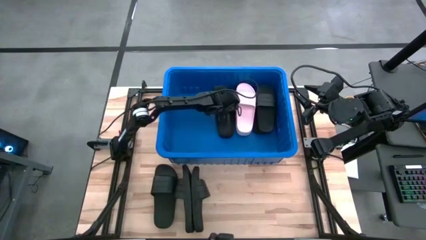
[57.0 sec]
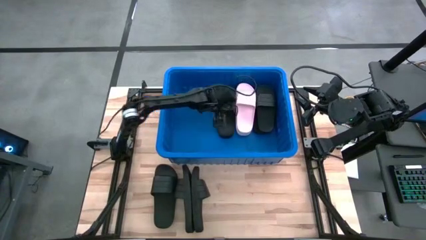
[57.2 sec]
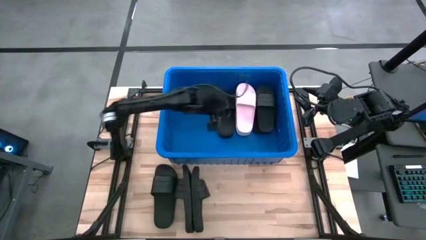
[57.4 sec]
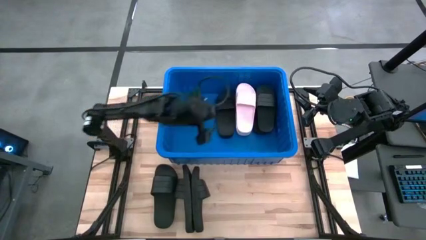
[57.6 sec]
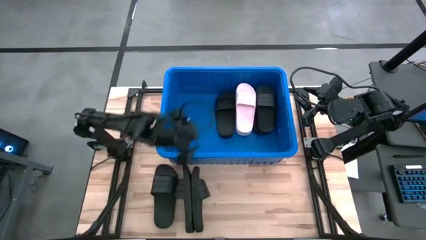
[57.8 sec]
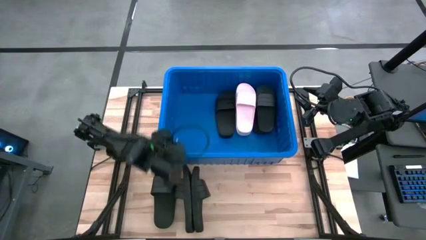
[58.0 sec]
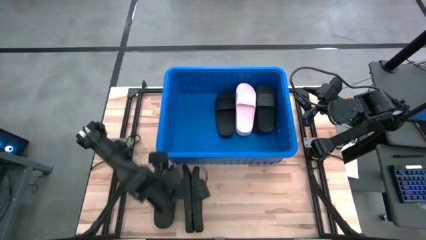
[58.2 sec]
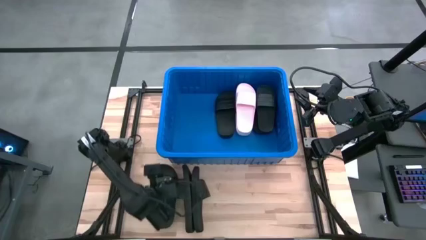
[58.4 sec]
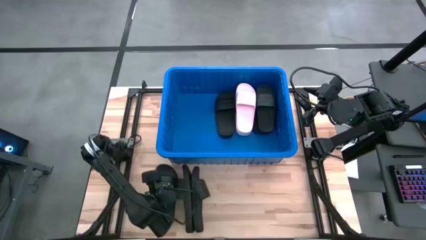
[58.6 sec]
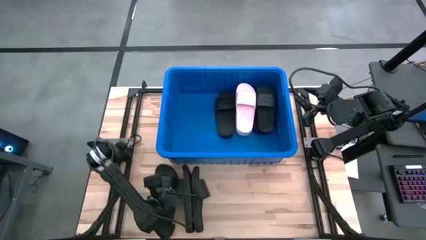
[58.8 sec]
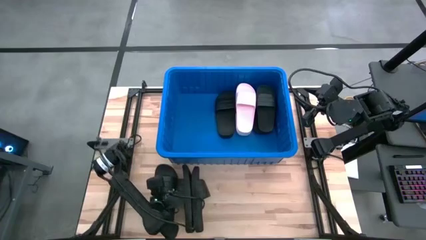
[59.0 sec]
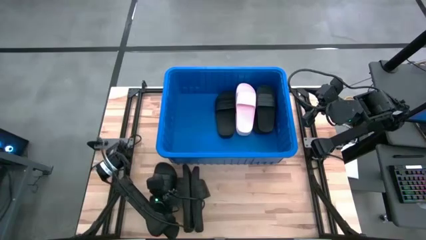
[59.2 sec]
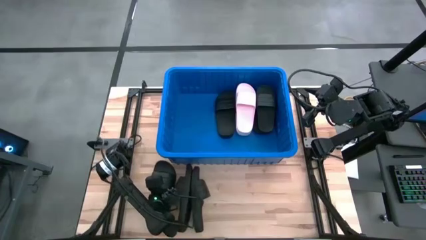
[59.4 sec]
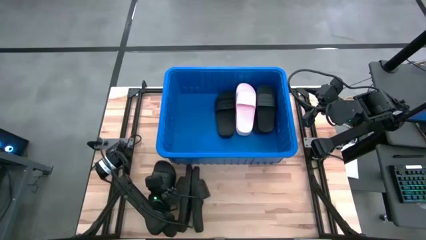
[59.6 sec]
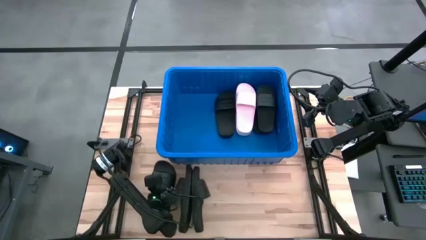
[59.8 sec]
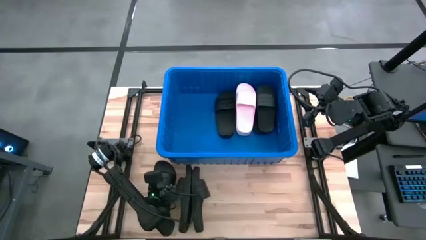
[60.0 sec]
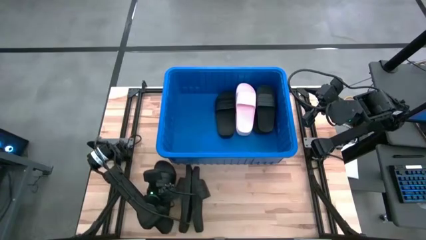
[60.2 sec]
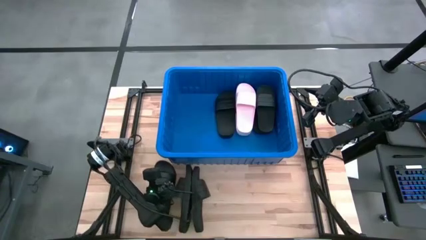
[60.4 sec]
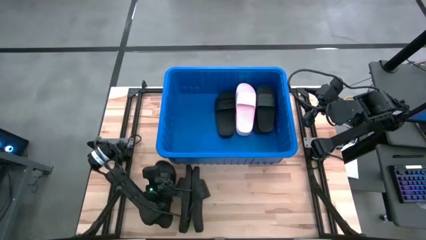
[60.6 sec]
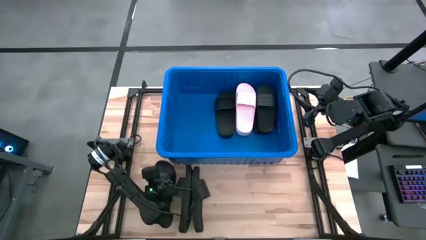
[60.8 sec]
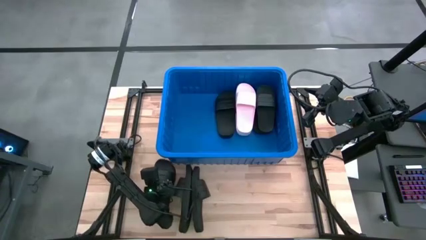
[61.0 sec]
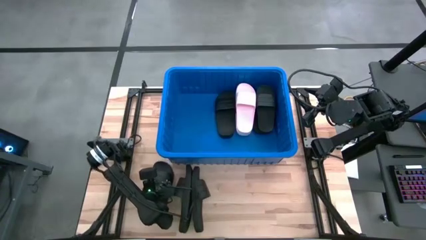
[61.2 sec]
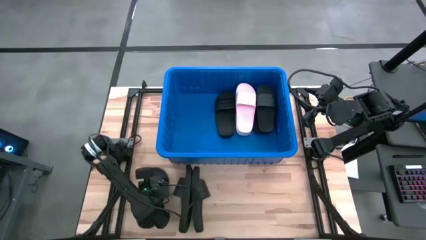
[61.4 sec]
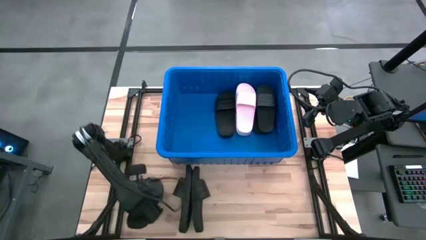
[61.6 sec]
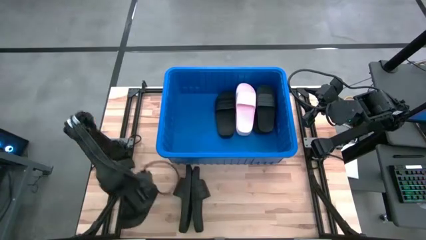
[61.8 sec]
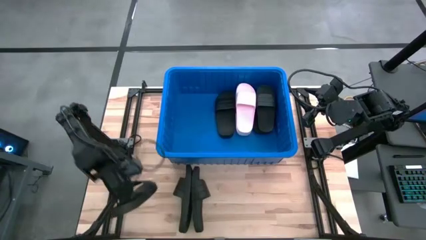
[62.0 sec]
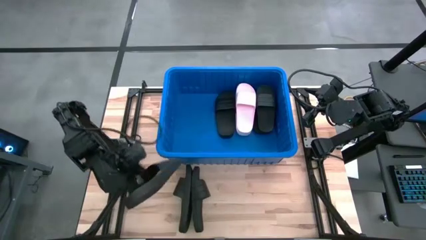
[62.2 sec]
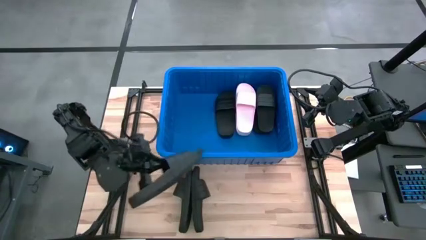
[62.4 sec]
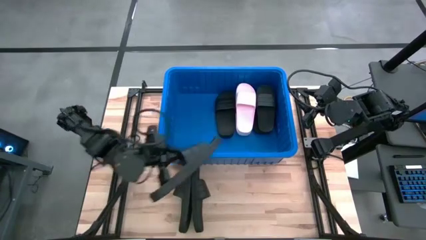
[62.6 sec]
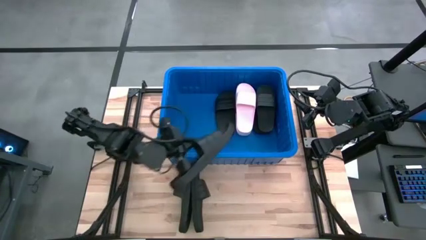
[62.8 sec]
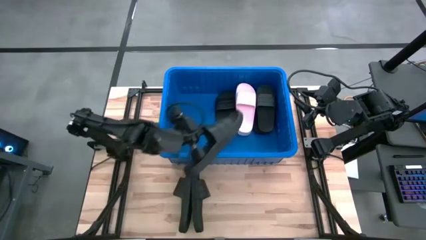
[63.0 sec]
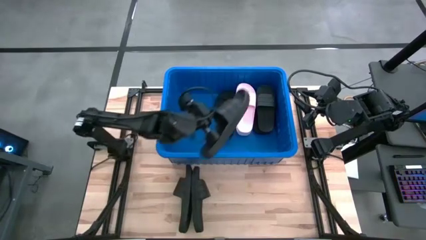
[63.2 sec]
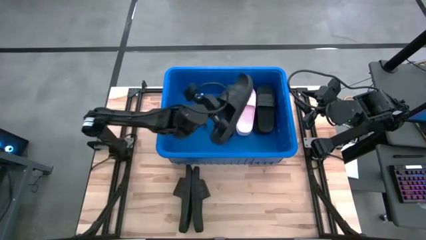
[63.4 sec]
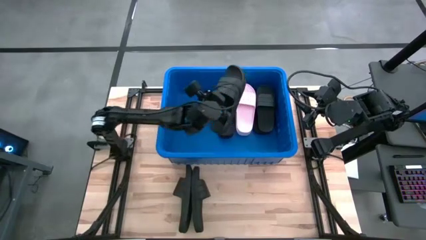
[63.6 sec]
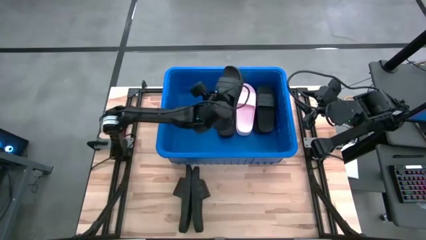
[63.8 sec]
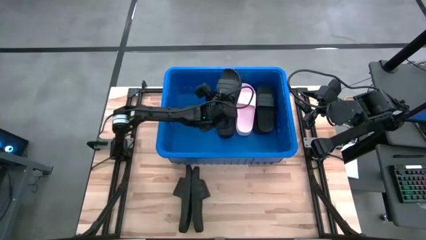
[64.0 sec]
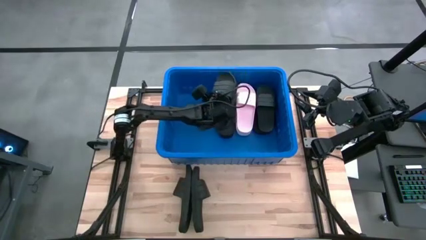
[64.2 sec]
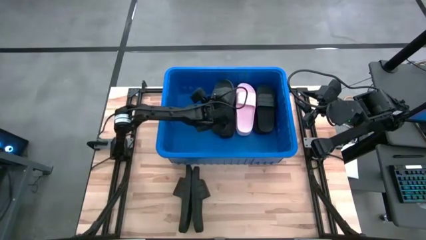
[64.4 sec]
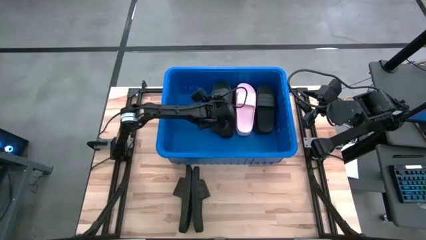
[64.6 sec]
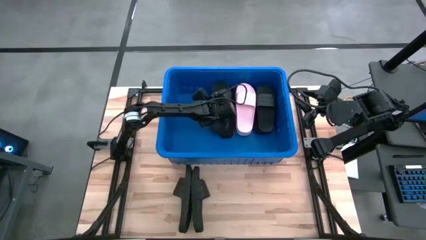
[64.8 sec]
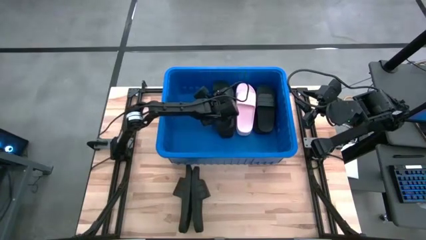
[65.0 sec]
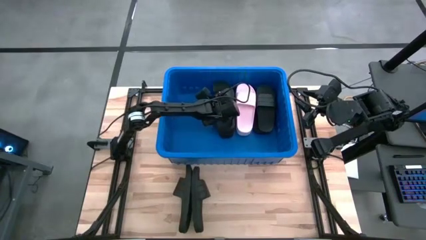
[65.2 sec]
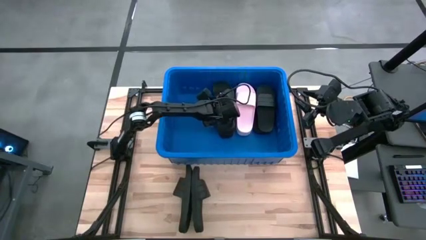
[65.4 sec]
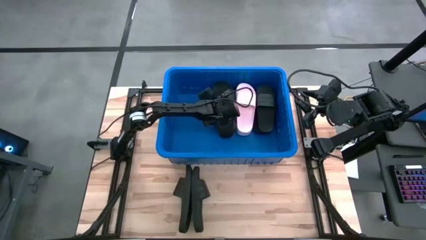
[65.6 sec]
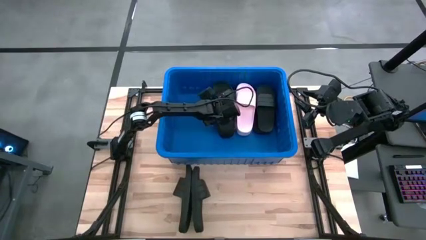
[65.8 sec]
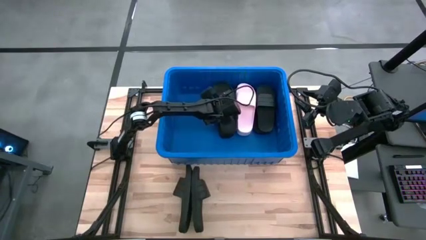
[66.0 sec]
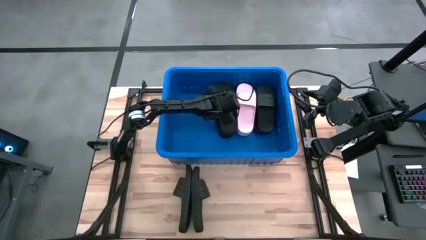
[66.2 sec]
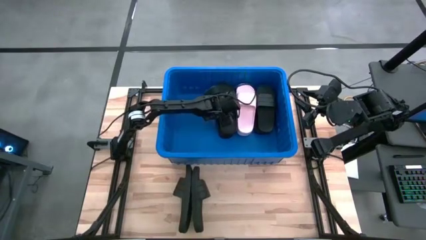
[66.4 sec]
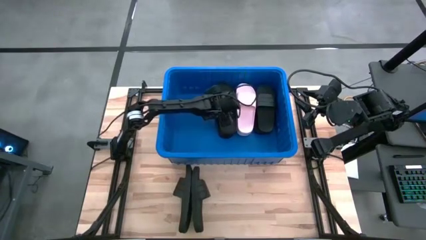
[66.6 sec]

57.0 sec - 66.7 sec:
Task: Pick and place slides into bin
Put the black slide into the blue bin

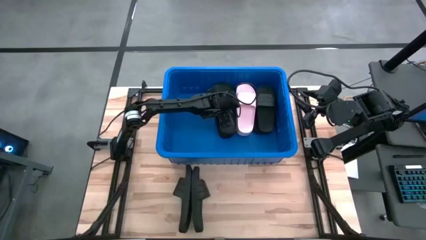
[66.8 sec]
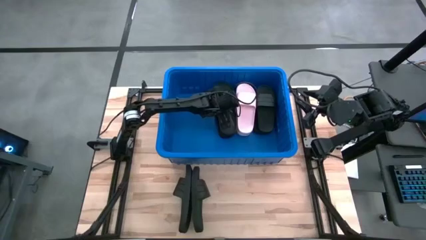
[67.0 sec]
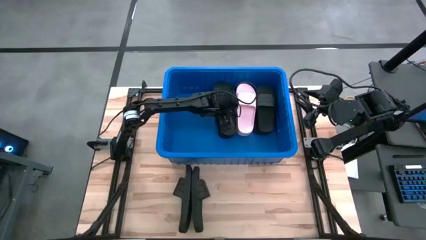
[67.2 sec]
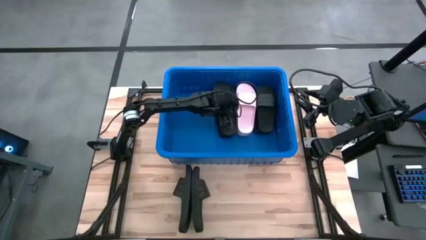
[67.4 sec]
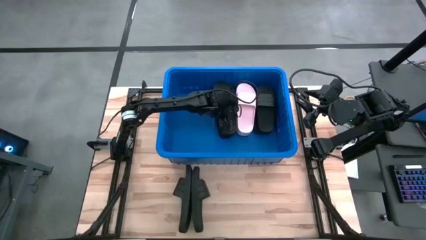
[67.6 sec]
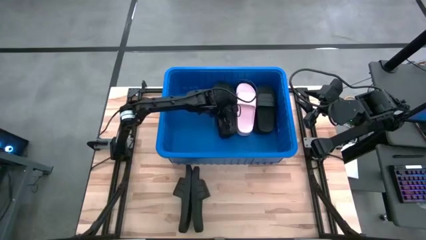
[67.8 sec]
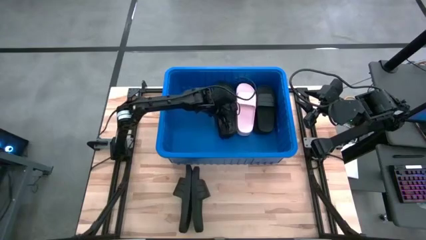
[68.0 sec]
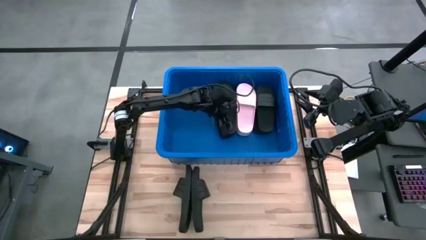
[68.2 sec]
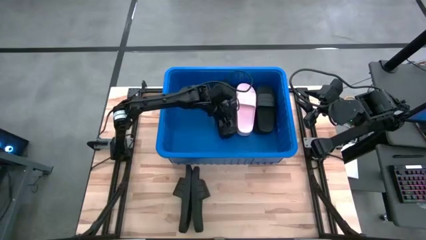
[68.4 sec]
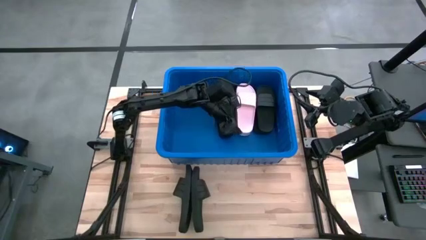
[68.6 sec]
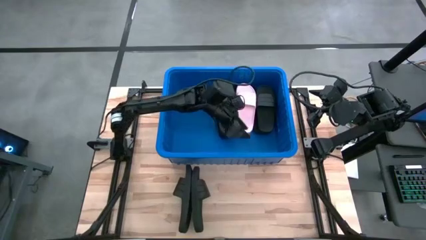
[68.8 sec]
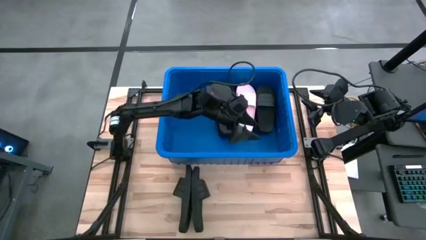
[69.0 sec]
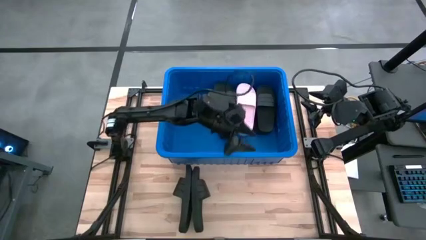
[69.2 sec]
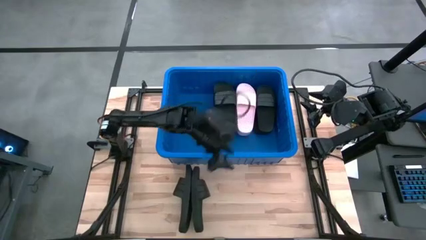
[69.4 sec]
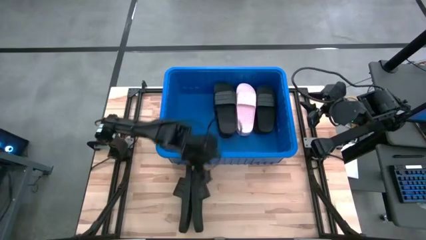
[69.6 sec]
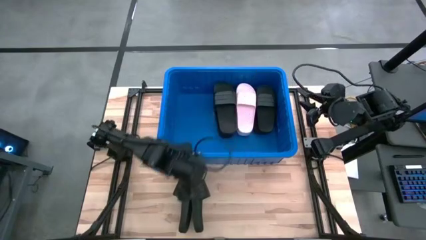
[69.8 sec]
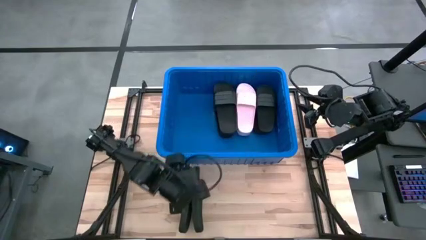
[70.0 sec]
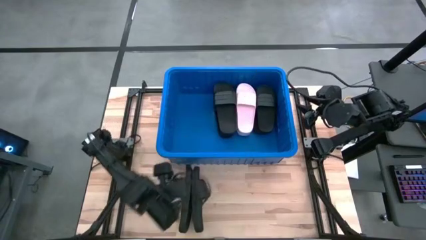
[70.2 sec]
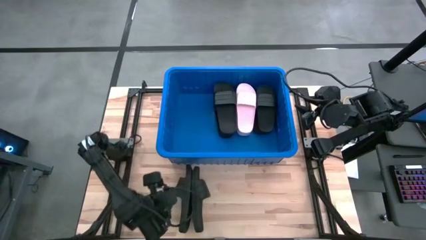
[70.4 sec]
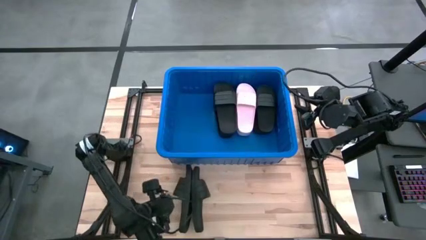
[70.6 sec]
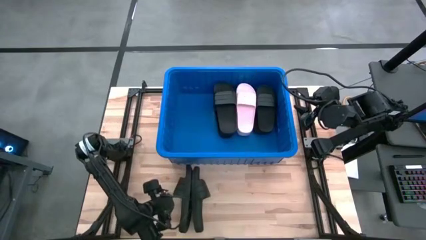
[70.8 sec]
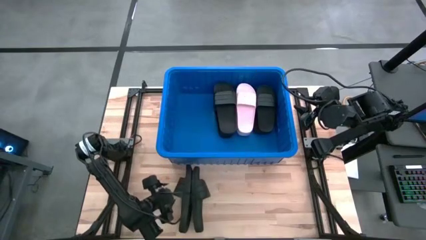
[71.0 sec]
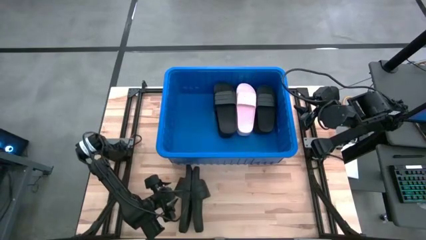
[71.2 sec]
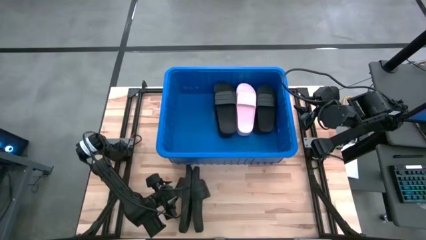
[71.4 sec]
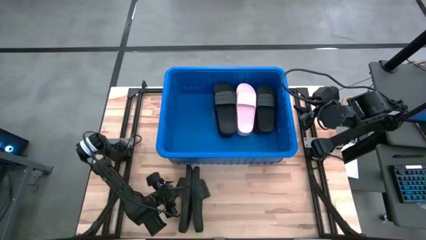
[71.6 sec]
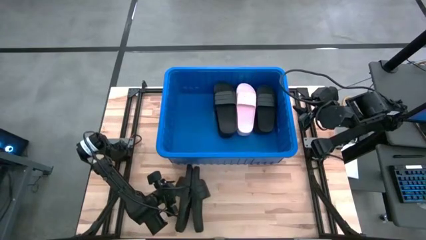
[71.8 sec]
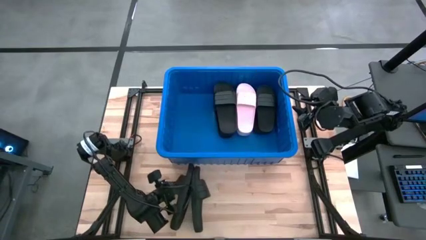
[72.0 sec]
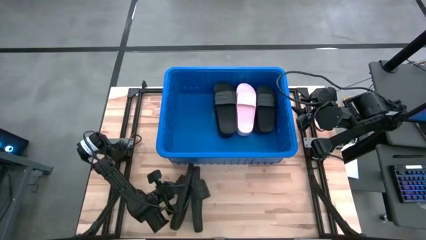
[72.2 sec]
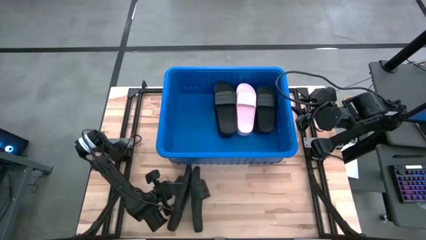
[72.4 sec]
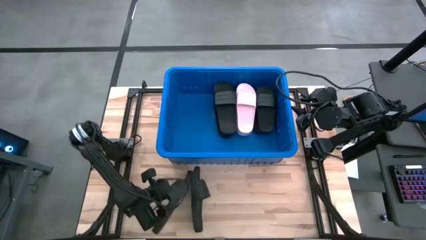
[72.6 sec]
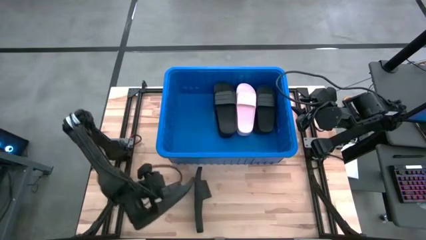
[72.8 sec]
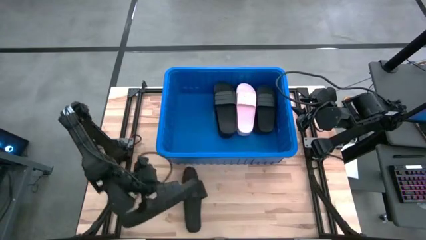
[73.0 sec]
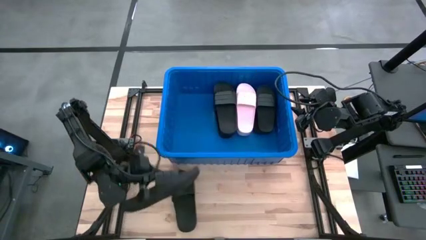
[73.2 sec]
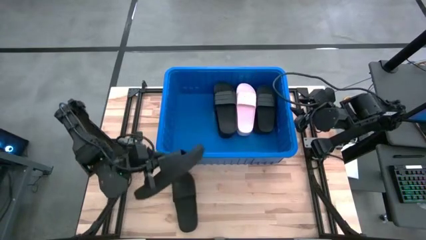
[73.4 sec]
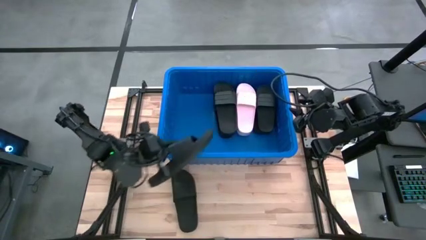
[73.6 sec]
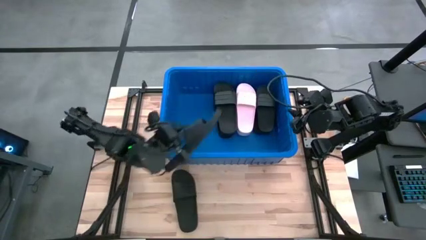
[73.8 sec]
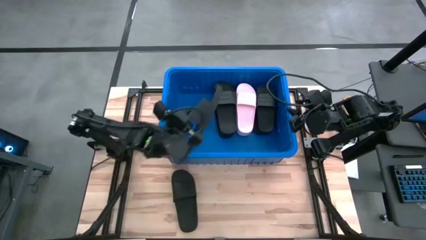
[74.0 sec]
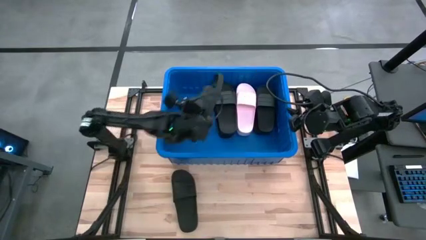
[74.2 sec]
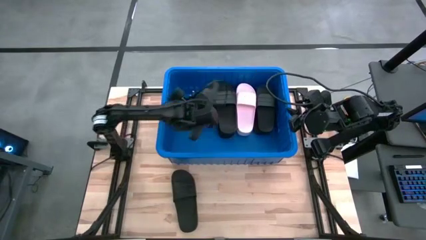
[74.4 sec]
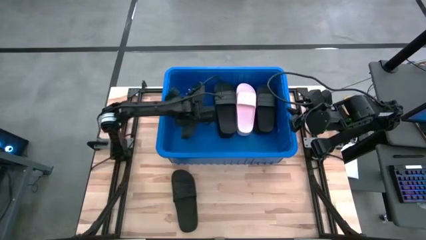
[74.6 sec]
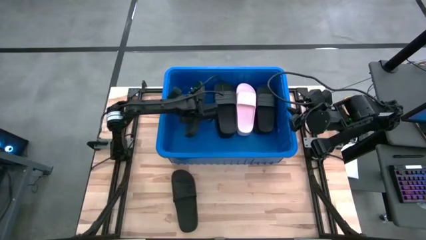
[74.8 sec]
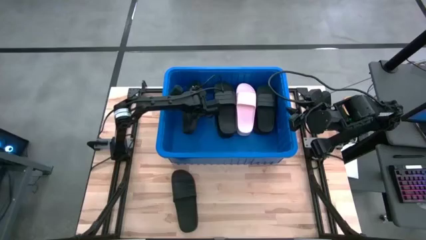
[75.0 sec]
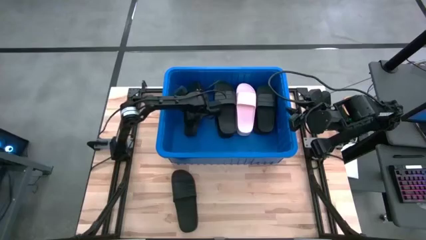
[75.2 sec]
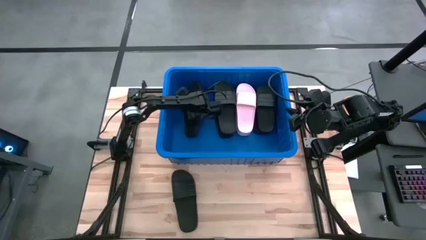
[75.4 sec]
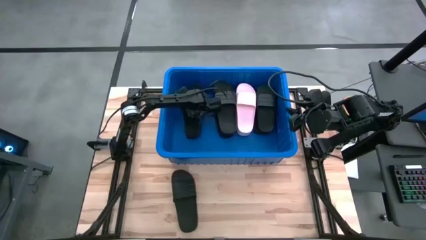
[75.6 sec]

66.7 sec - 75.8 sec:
Put the black slide into the blue bin
